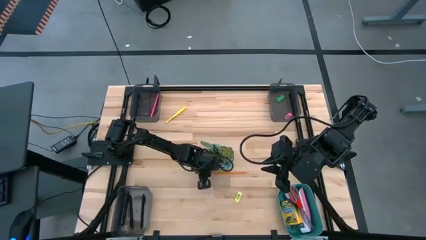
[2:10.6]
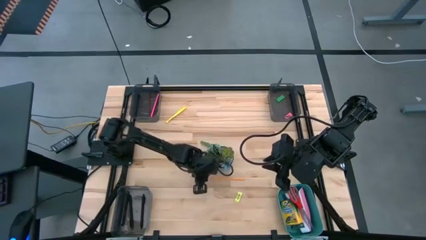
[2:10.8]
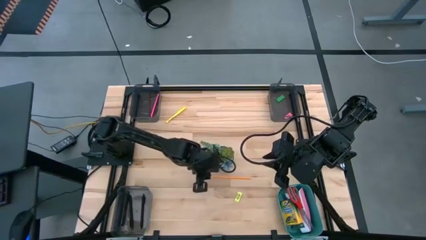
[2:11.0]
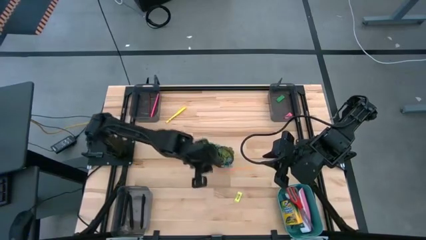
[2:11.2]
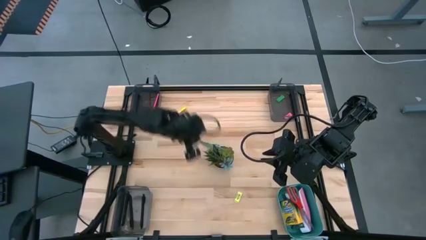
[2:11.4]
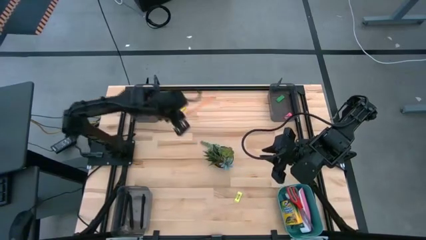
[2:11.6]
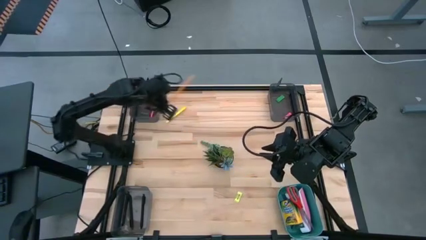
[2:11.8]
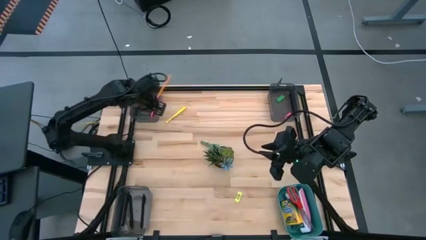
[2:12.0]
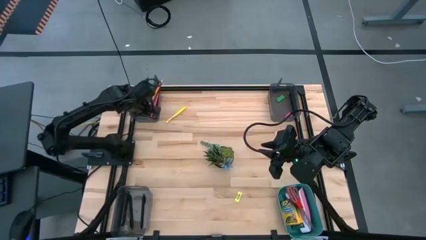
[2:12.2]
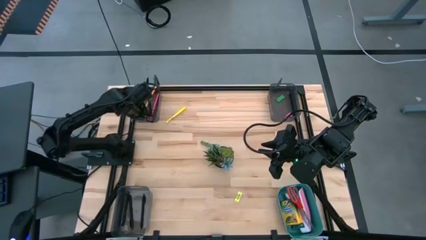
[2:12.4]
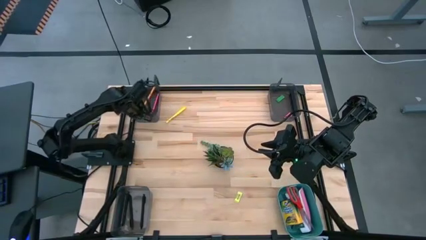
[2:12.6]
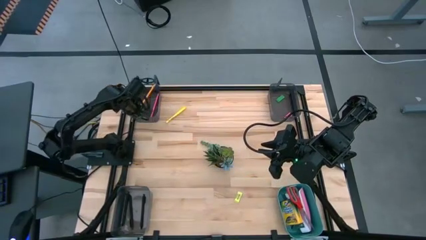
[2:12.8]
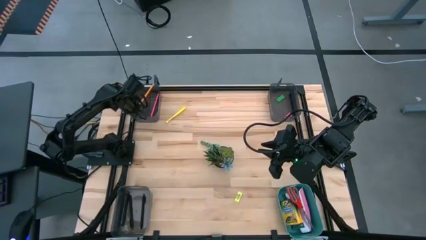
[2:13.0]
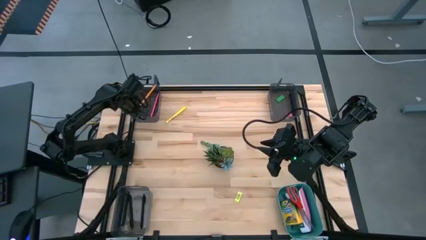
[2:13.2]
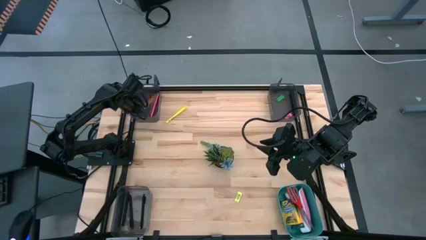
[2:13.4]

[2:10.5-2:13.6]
Task: Sort crayons/erasers/pens/pencils in bins
Put the orange pencil into the top left black bin

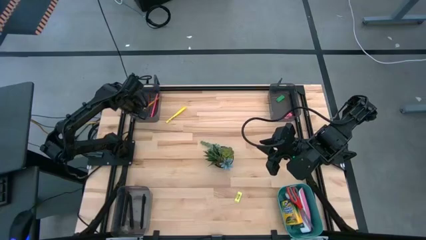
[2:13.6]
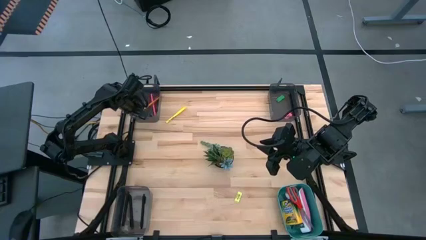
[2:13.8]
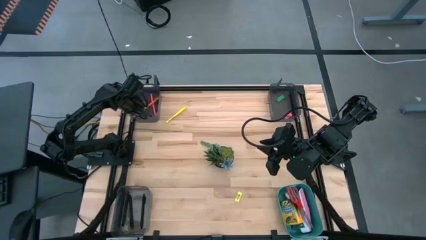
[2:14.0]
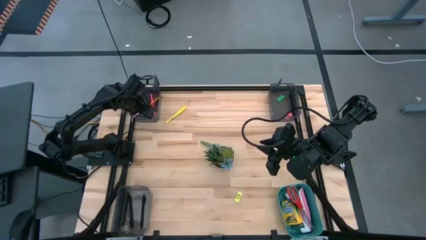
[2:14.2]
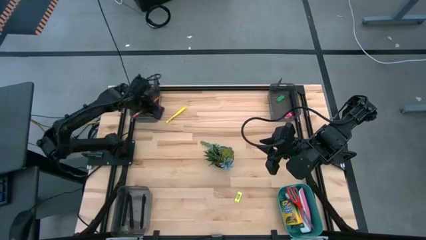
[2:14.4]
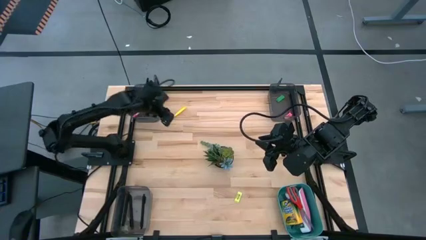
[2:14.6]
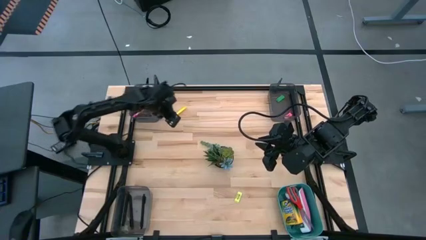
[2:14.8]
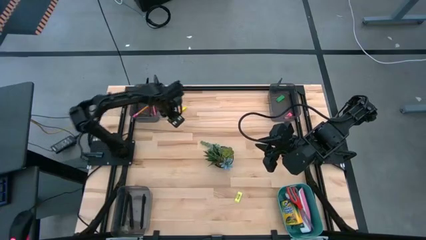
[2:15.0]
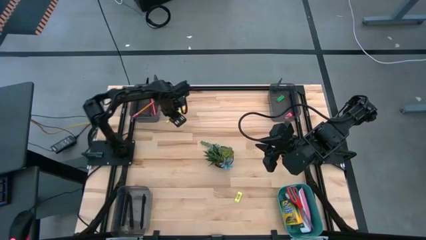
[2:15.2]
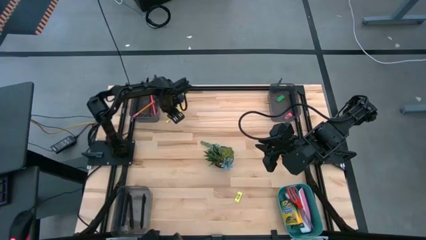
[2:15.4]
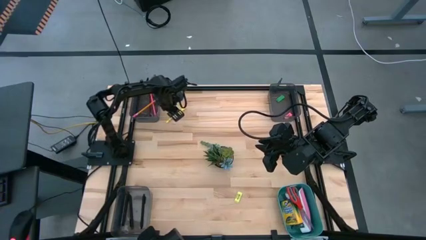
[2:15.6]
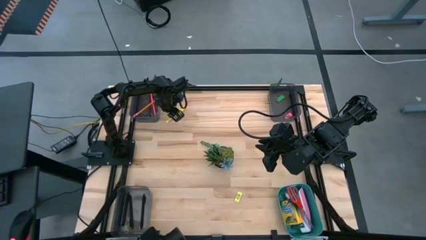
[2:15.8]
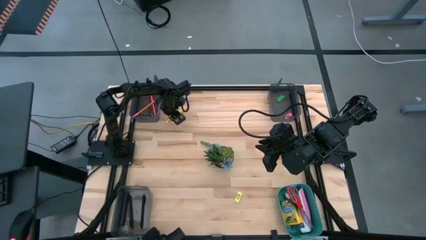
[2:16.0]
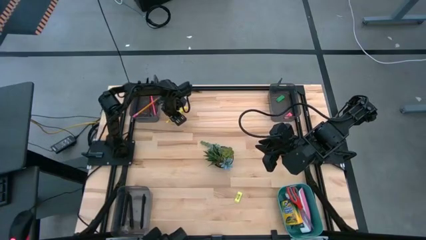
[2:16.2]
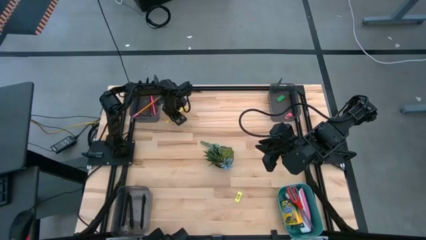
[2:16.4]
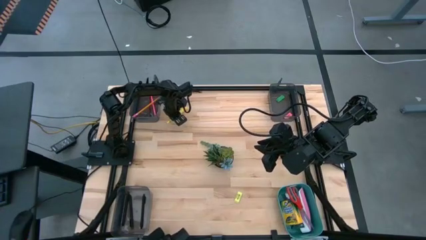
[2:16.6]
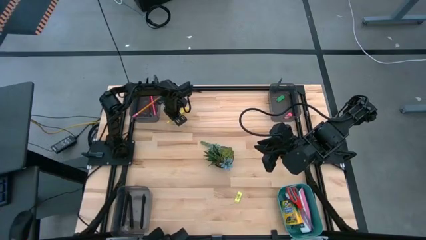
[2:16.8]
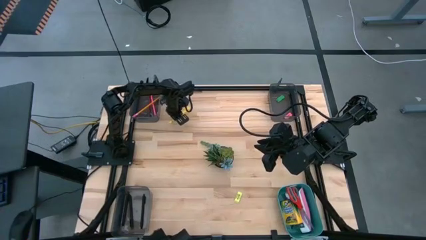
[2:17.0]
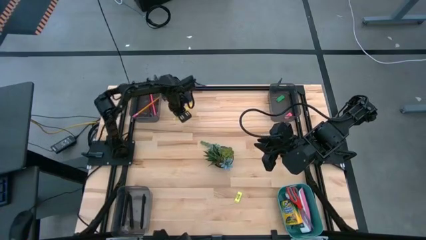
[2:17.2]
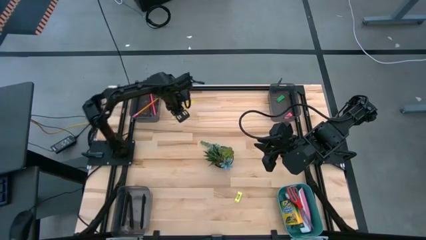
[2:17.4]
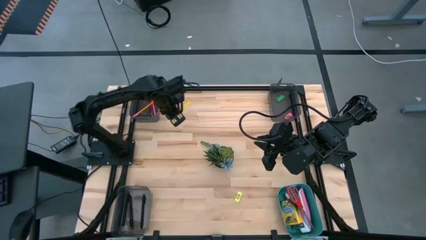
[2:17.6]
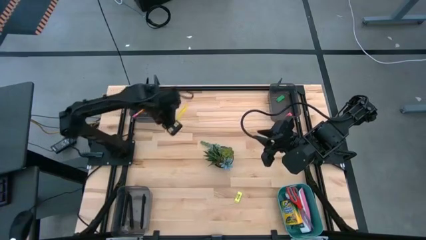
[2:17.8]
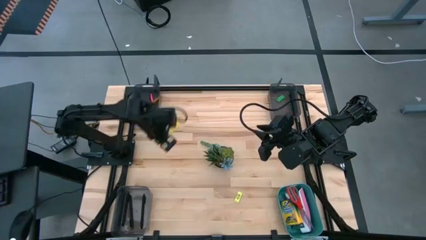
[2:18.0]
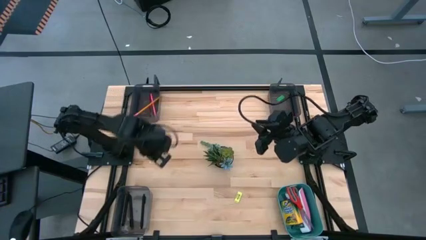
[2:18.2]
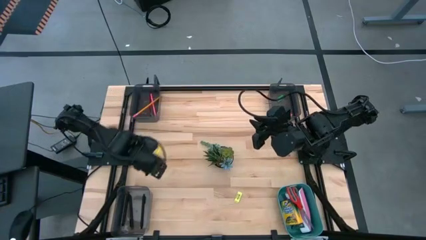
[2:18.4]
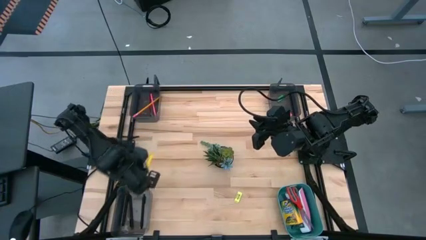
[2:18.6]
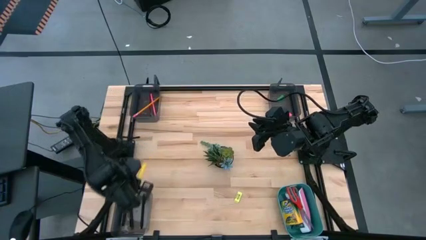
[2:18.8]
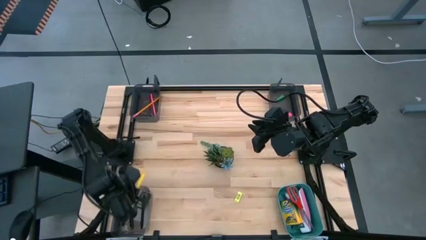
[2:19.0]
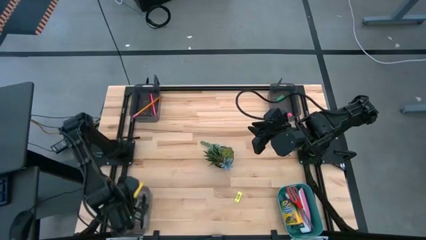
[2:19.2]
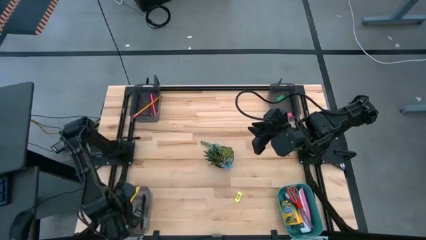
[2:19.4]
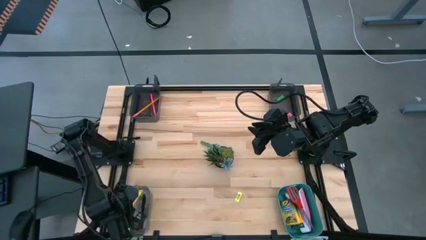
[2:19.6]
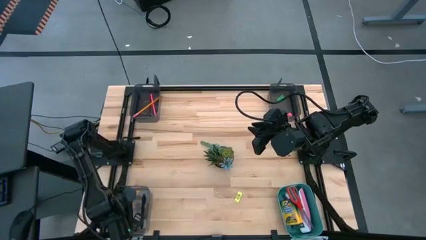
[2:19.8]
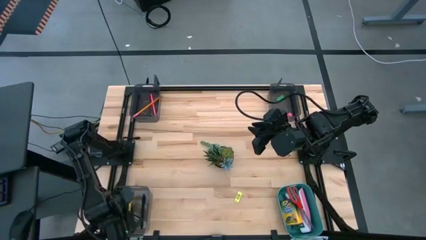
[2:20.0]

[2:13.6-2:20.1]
Put the yellow ballpen into the bottom left black bin

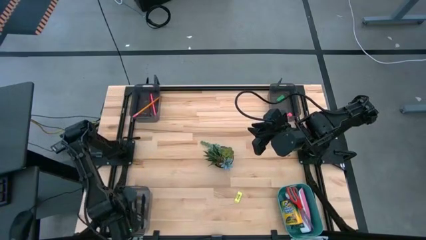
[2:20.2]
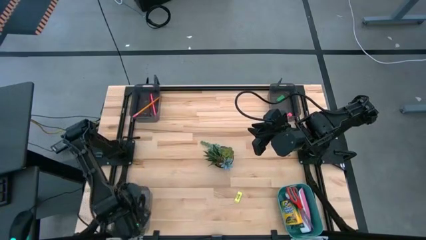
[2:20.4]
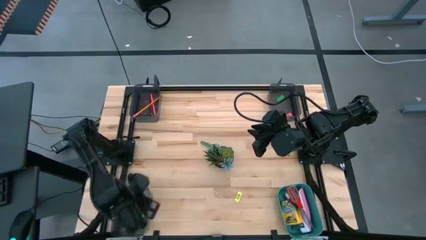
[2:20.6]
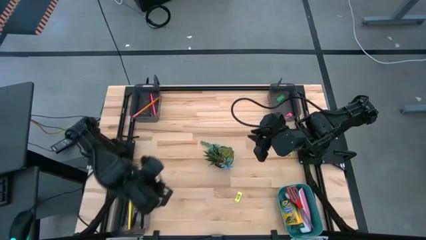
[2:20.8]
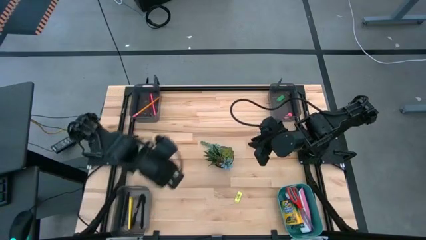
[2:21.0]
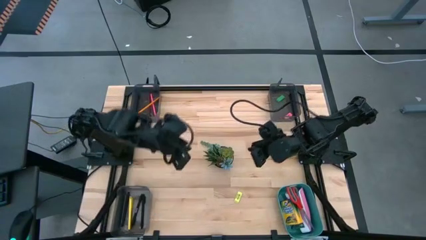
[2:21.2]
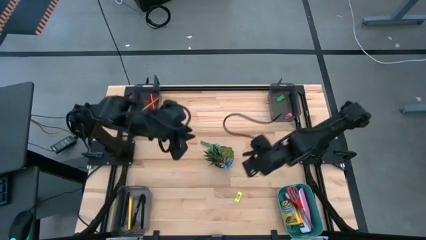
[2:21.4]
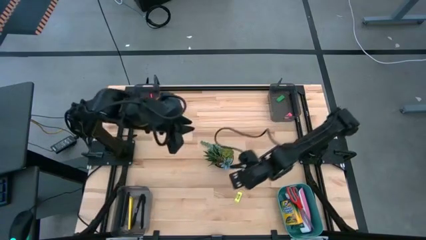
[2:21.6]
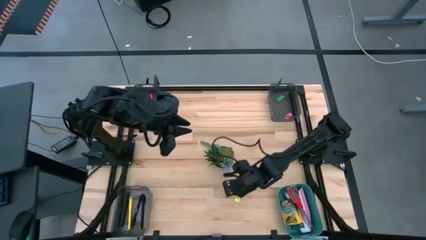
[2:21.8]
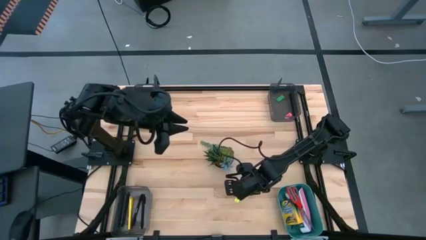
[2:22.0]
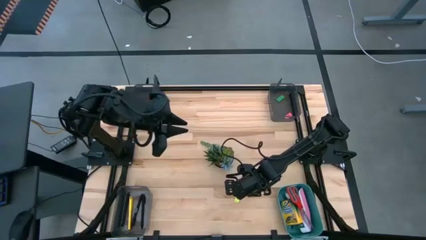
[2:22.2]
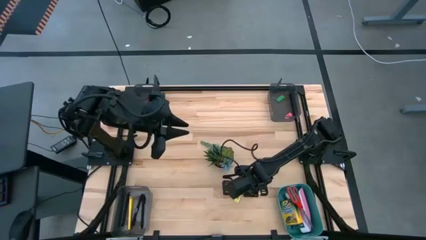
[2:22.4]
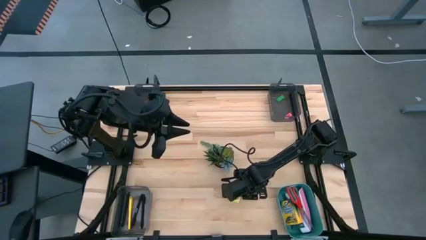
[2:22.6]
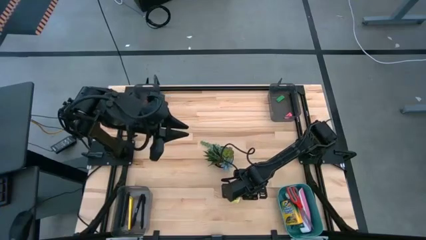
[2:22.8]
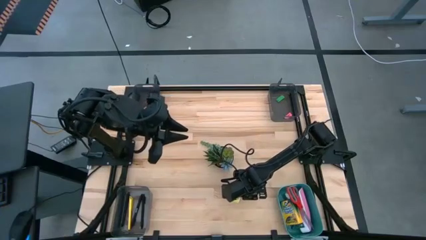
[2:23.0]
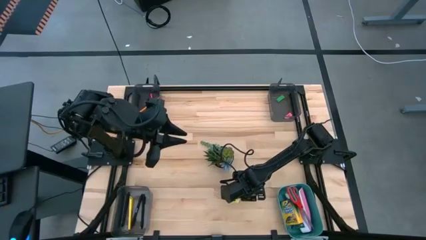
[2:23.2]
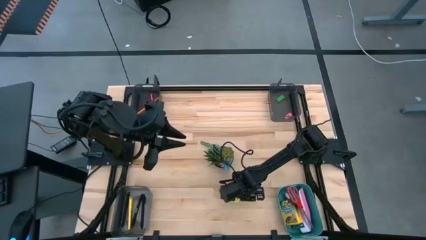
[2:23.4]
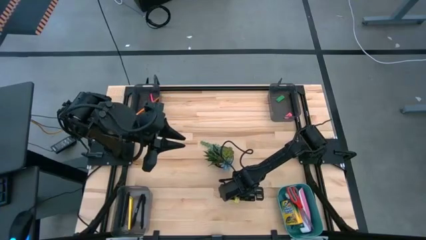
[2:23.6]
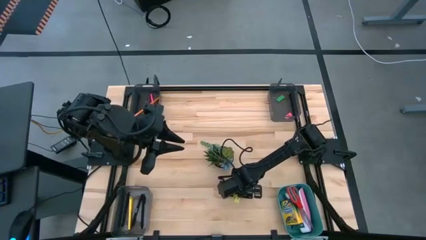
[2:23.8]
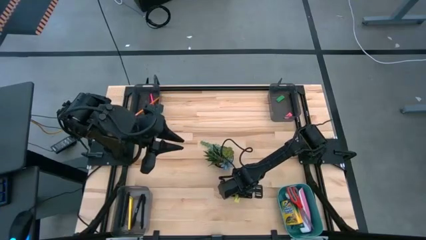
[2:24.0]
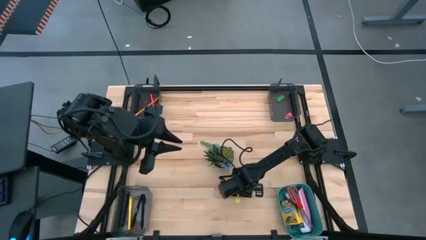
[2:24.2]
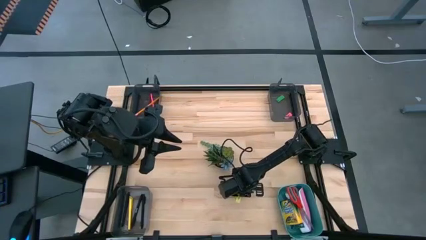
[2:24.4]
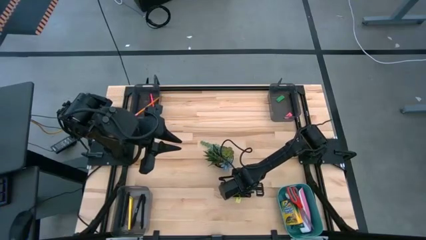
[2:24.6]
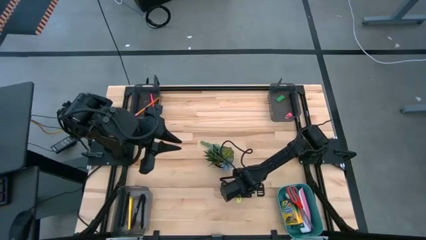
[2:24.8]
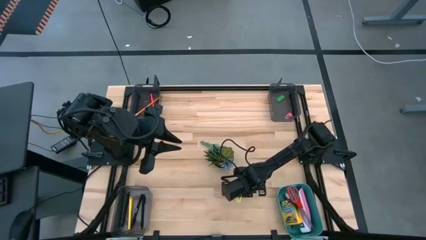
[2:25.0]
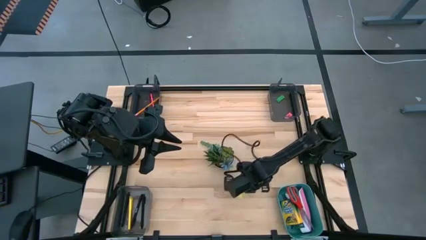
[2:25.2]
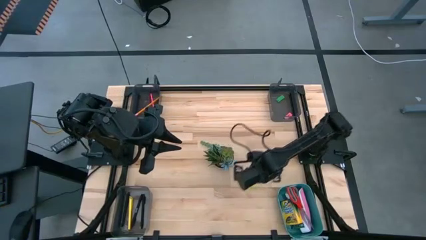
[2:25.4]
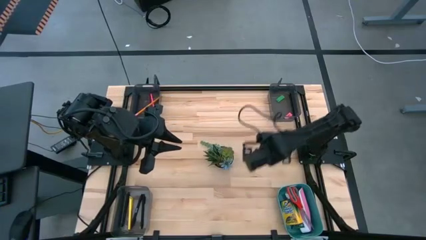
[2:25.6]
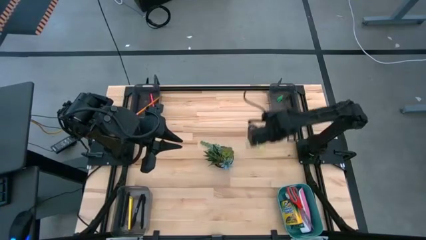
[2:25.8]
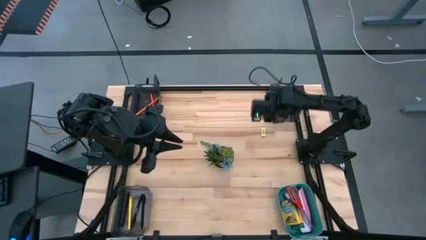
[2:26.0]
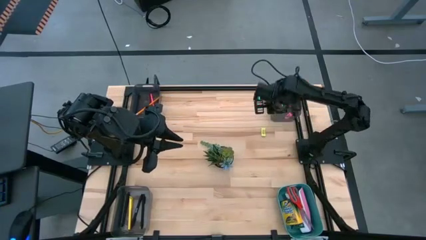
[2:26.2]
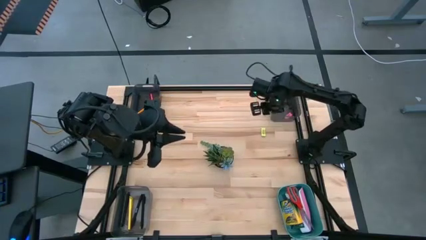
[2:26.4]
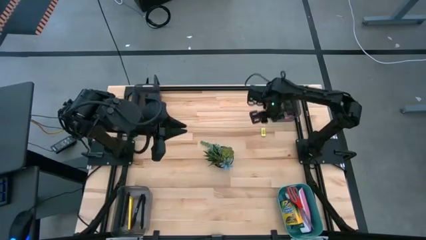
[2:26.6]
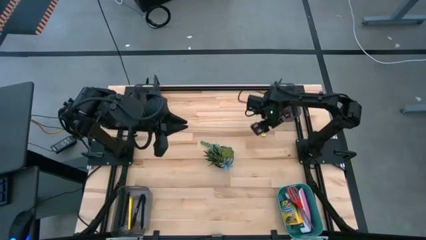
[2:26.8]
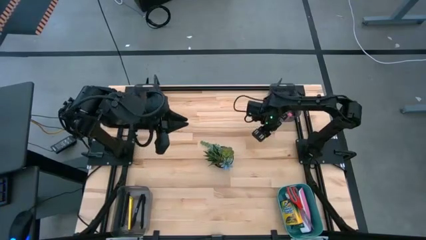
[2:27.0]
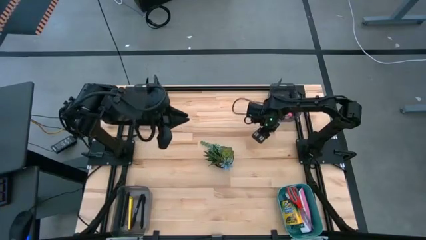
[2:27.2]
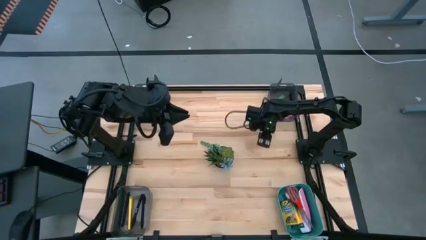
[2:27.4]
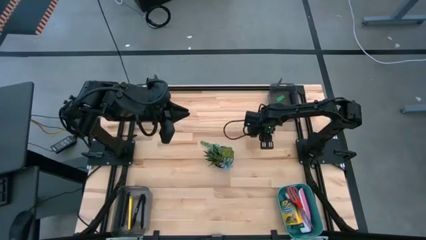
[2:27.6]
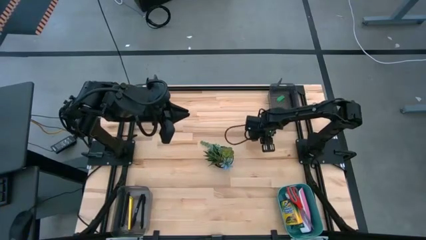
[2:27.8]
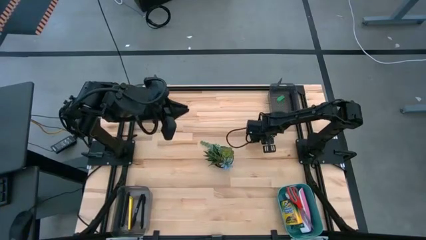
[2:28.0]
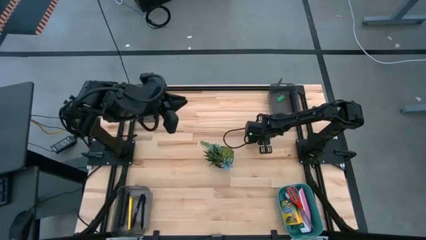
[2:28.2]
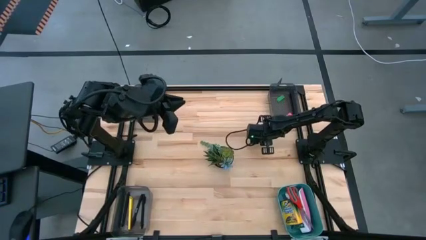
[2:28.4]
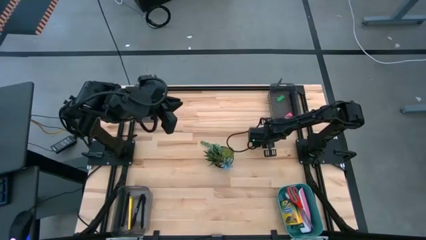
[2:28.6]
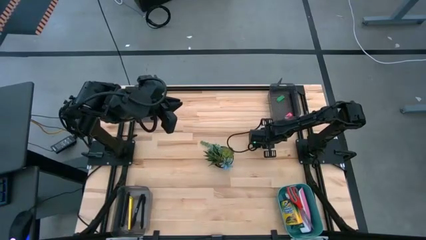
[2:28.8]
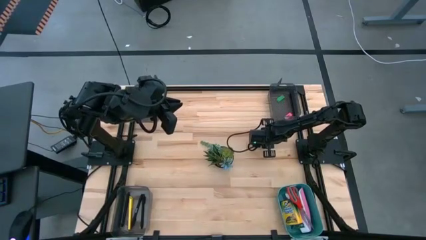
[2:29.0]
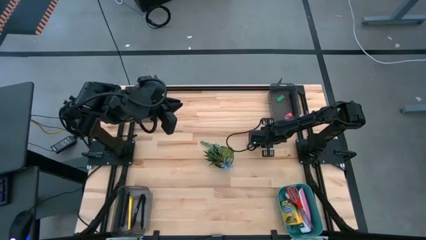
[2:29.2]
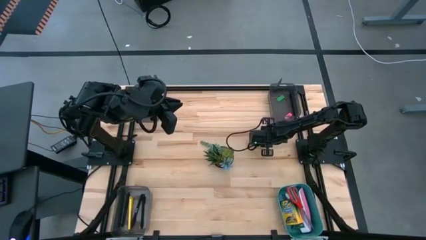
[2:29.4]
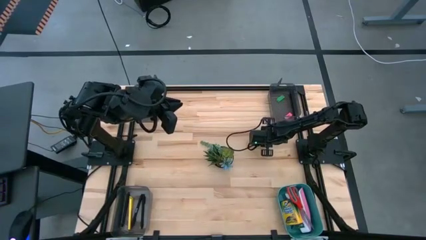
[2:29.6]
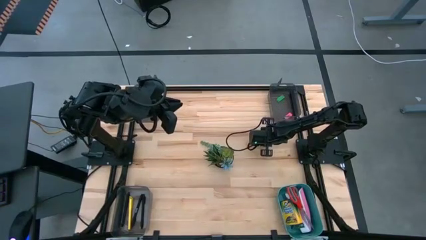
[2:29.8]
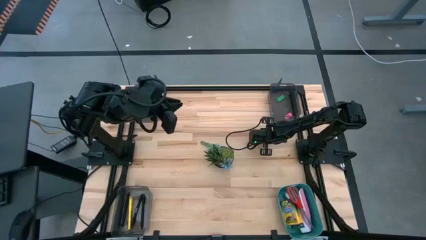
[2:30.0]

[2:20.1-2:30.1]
Put the yellow eraser into the top right black bin
